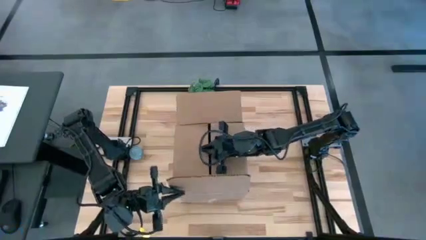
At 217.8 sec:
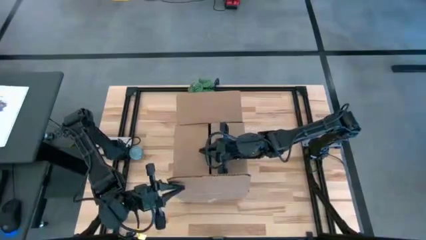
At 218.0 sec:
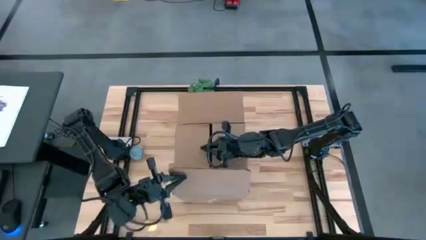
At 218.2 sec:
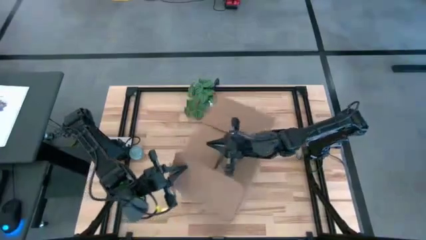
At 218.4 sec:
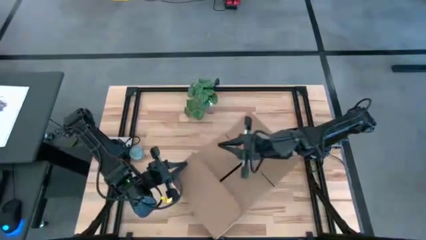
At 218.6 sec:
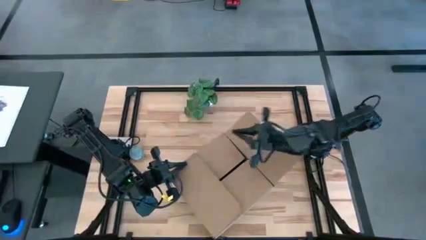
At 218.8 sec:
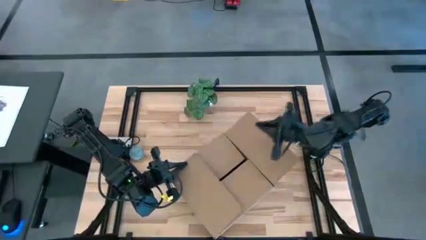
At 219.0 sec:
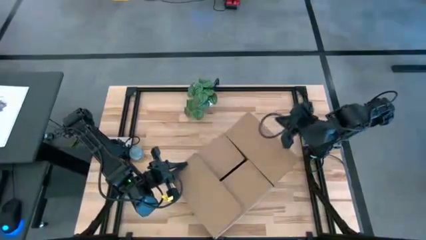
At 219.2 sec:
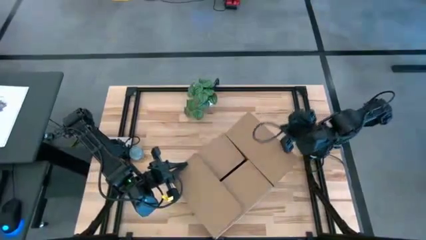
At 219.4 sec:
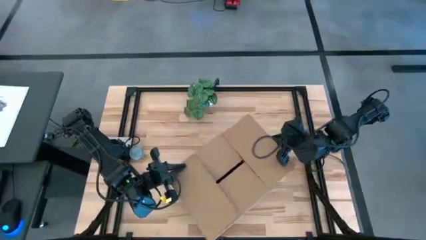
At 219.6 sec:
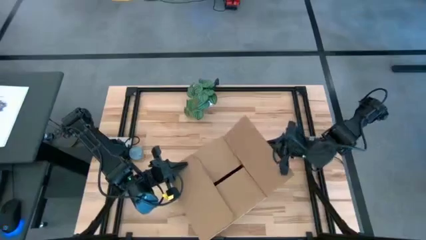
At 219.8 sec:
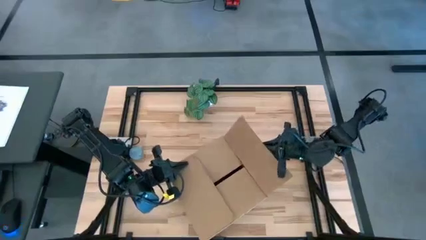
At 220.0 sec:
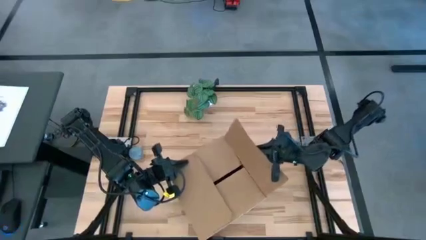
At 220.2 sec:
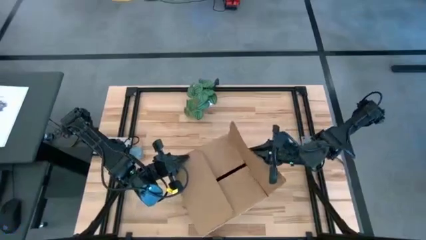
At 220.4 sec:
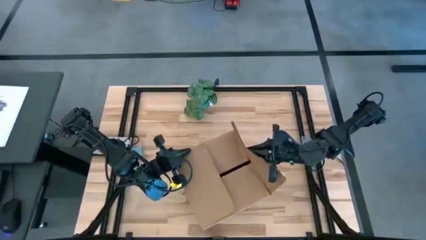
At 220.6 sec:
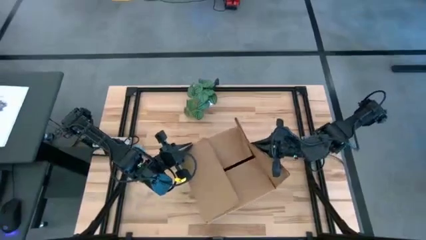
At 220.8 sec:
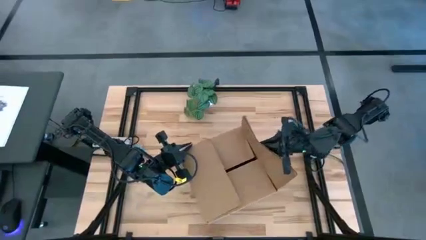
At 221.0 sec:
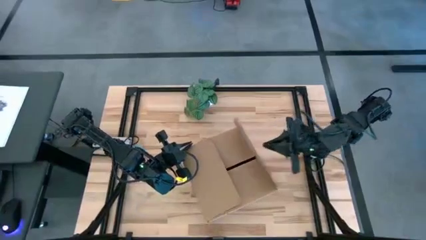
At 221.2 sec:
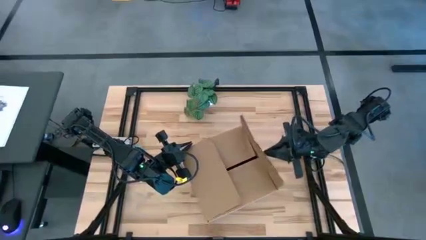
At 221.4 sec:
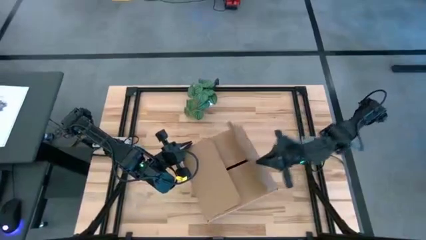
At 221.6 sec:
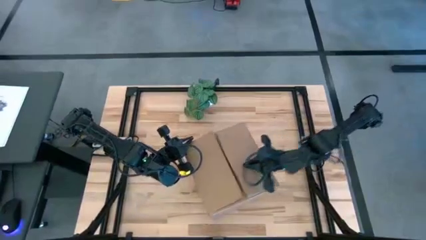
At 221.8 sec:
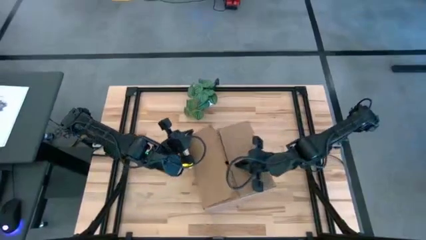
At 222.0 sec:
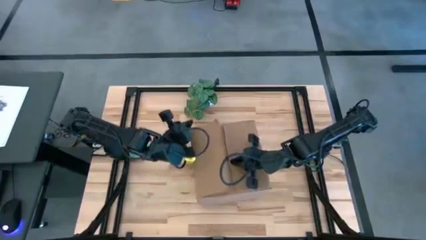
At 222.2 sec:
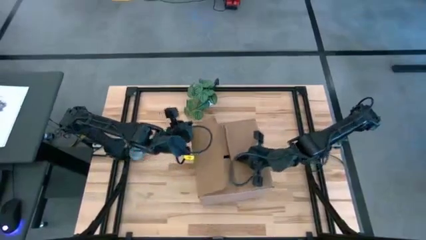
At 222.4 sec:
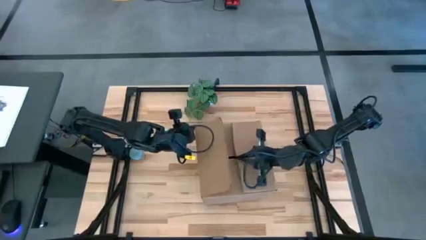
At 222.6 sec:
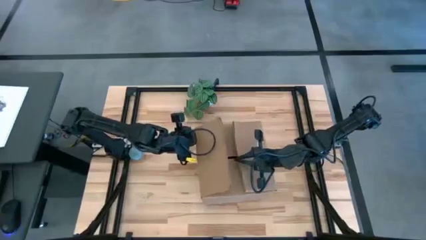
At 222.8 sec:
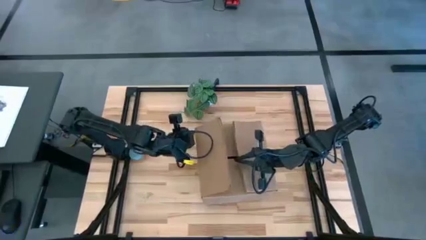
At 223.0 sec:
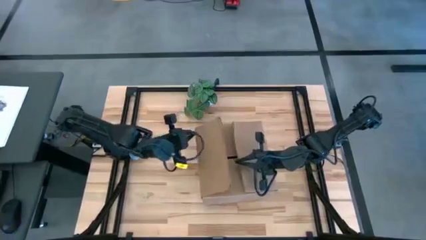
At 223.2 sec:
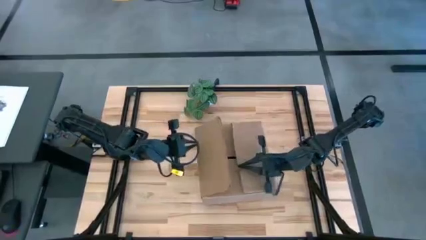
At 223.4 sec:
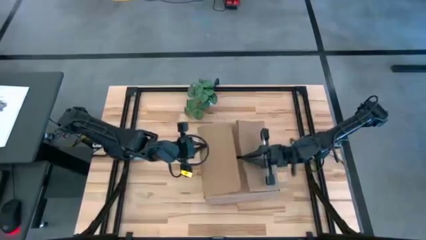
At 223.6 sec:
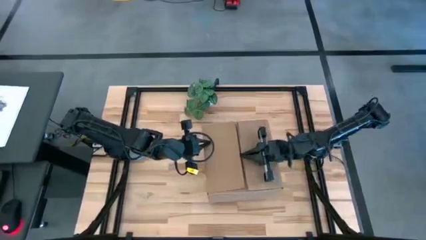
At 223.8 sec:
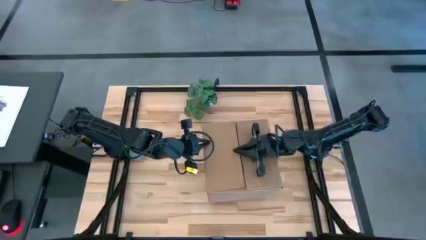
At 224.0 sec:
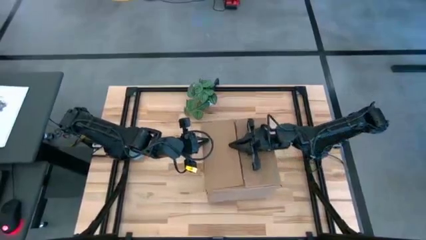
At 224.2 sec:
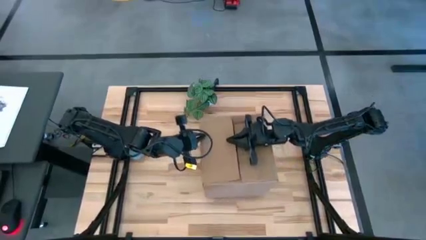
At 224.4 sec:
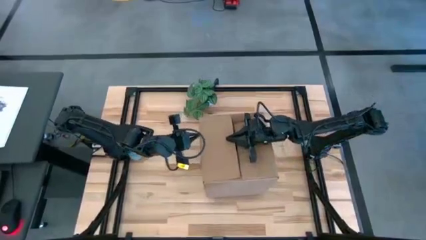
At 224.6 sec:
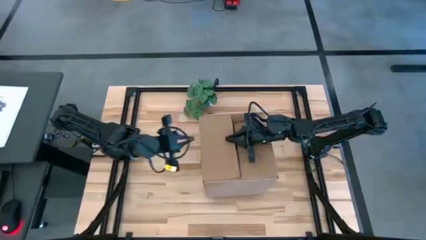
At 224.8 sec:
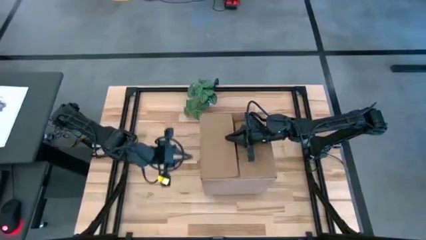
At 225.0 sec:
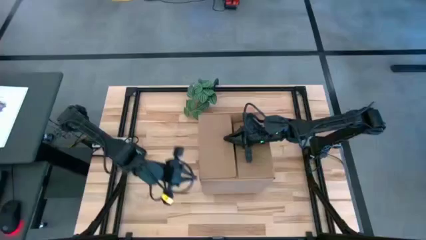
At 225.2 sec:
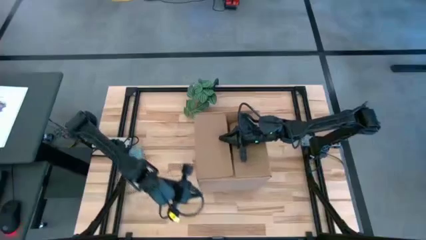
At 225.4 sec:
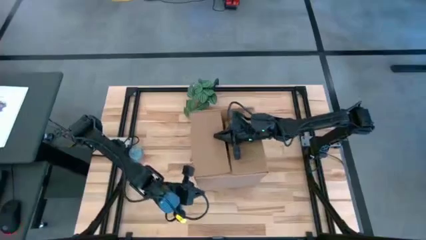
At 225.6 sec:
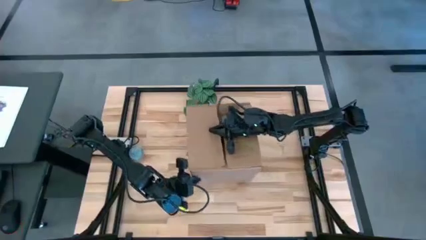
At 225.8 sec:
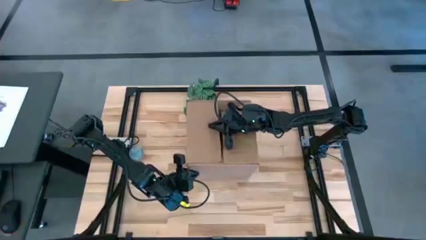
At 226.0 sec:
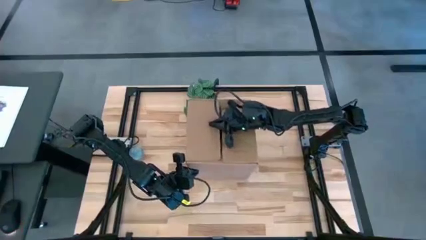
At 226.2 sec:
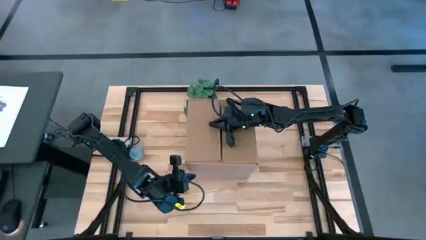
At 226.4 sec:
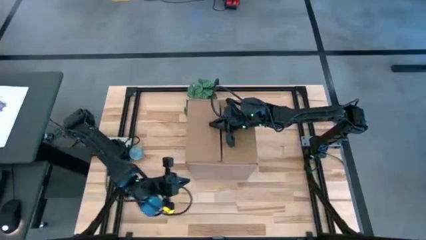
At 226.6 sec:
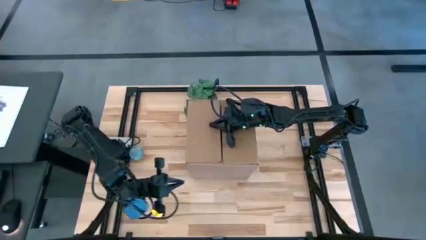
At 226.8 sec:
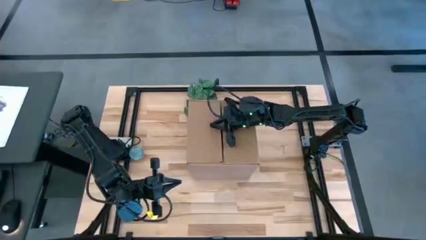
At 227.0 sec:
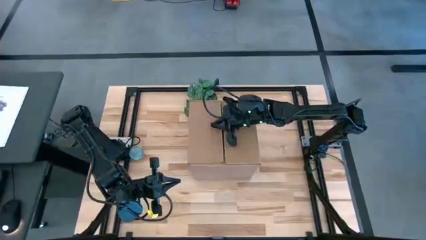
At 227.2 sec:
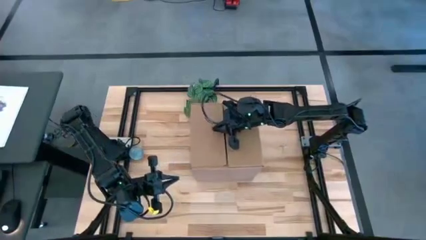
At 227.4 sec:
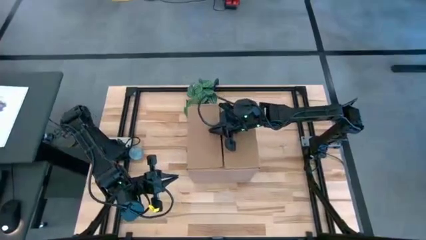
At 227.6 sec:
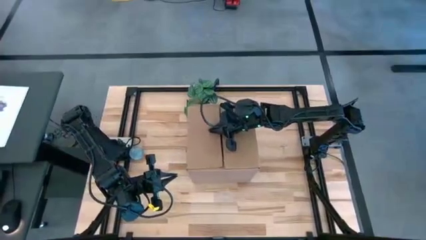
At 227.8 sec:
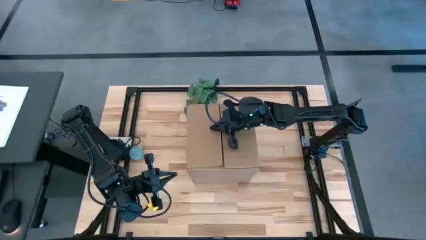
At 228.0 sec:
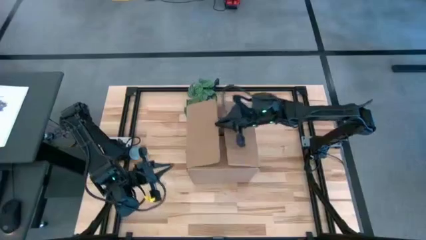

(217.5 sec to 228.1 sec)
Task: wrap mug
Close the cardboard box

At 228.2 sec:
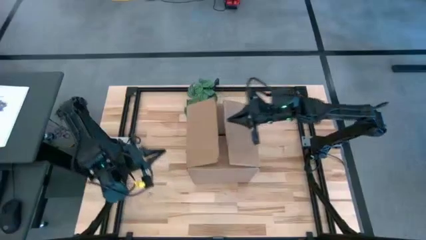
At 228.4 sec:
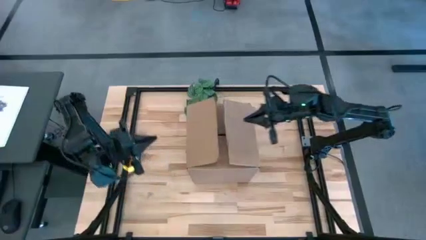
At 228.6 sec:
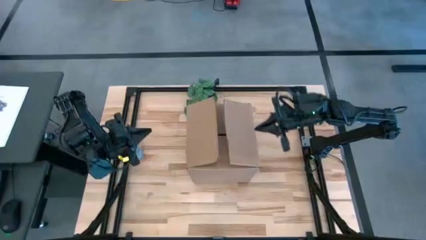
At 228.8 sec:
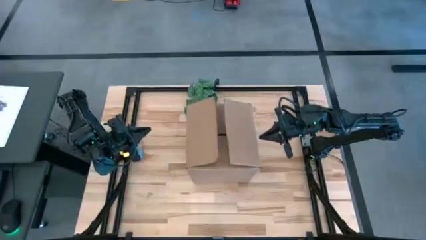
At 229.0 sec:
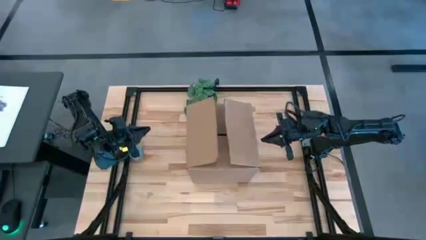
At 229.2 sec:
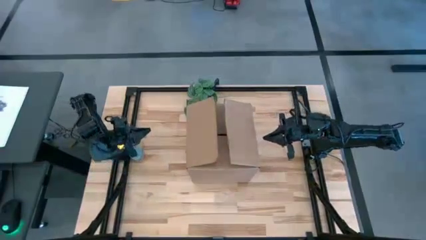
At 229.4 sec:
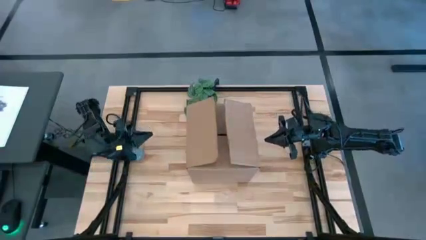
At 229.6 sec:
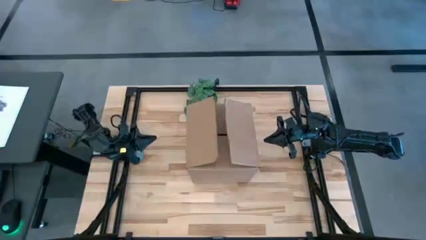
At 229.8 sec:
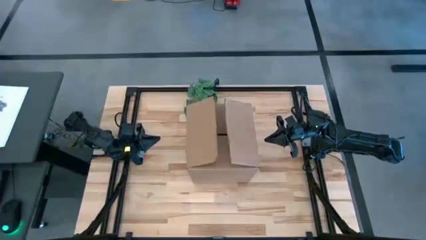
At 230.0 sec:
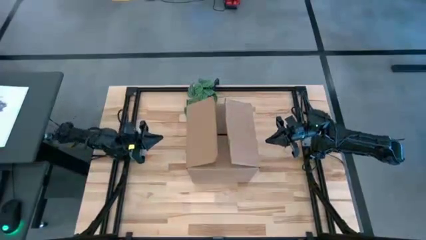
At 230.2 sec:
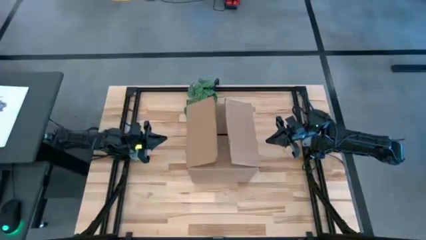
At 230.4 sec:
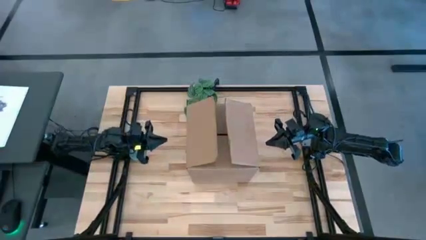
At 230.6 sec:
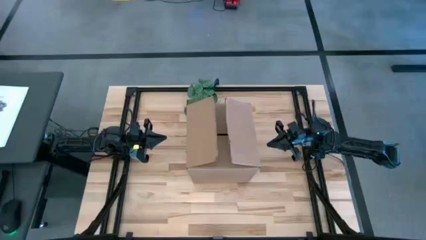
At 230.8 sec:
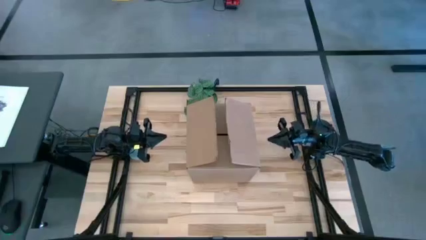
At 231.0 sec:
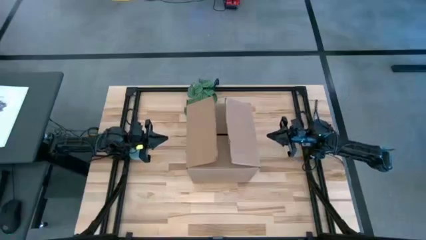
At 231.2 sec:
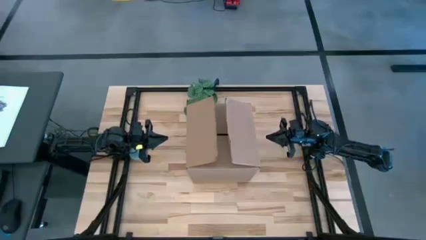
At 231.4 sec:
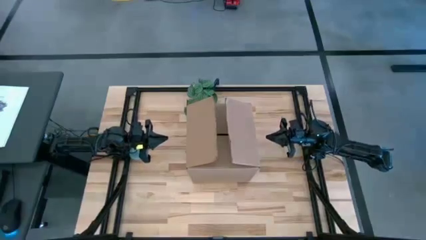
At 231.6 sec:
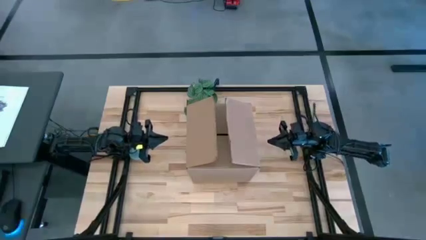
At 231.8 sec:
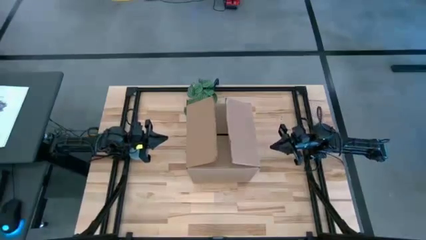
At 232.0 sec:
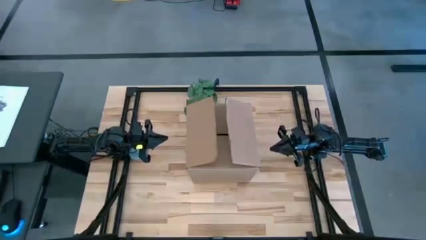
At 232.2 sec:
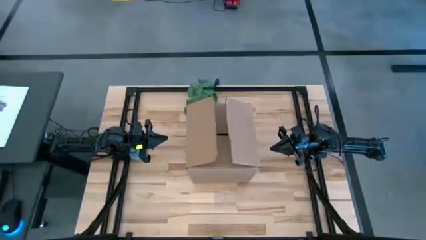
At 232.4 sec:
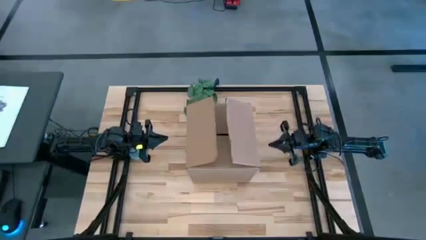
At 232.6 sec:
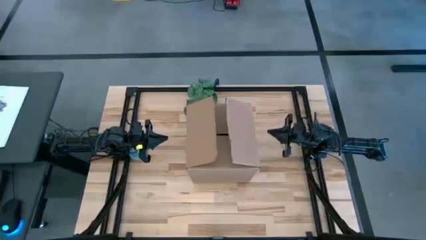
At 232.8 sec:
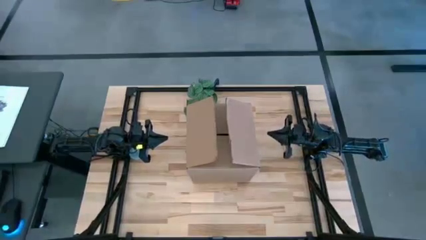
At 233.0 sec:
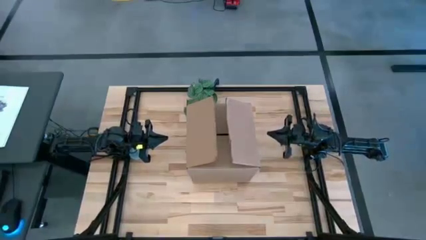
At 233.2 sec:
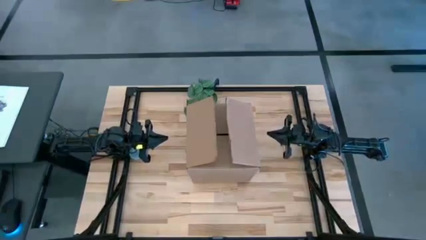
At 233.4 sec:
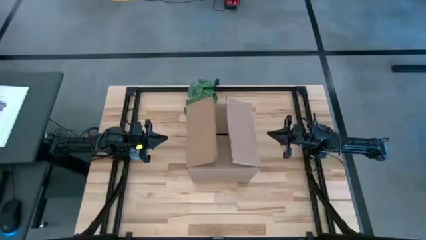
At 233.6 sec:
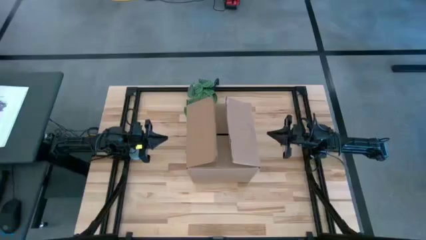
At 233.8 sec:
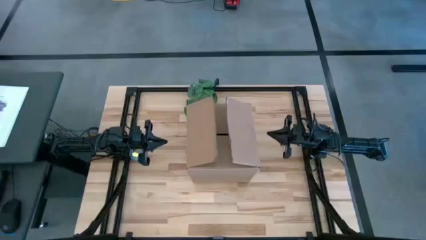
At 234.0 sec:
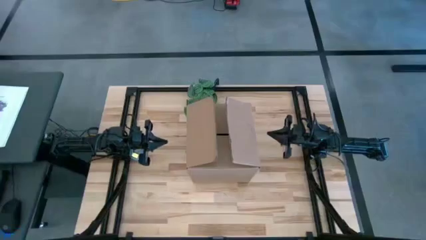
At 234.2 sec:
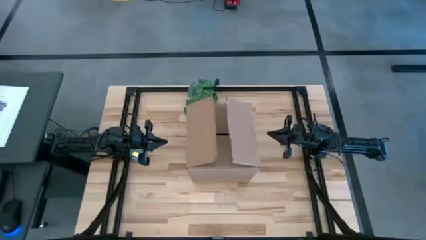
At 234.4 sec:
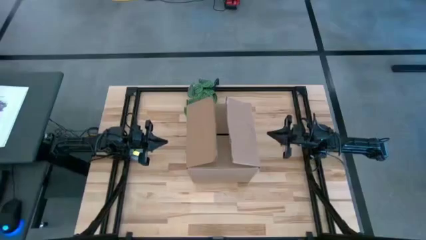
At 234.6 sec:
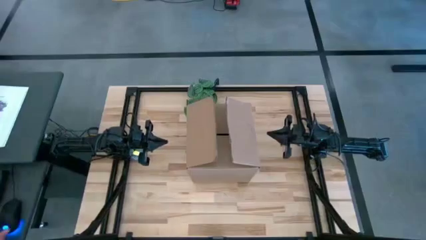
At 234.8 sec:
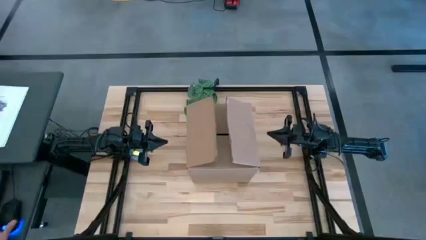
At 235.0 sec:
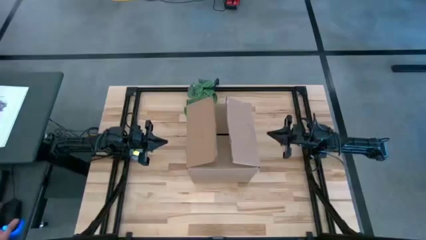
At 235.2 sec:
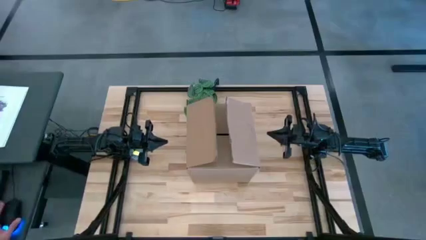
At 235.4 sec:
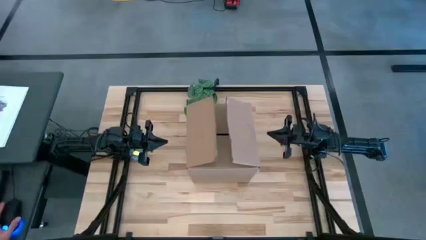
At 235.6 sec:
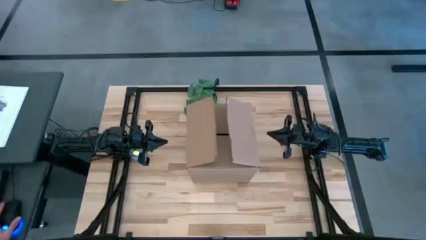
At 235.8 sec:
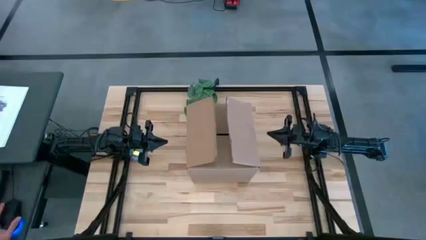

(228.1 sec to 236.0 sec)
Return to Home Position
